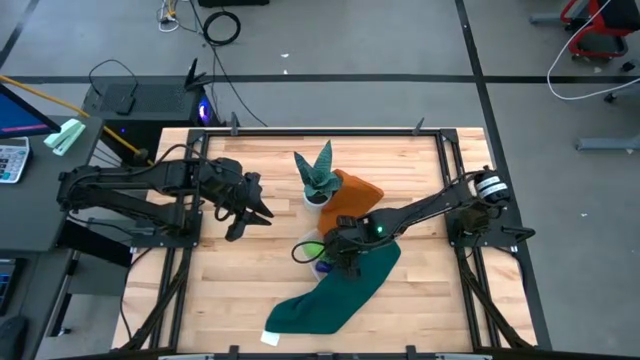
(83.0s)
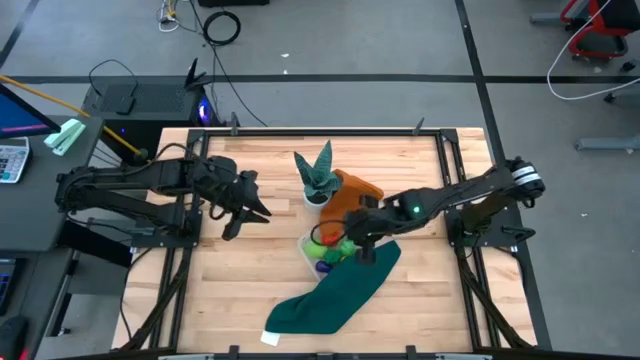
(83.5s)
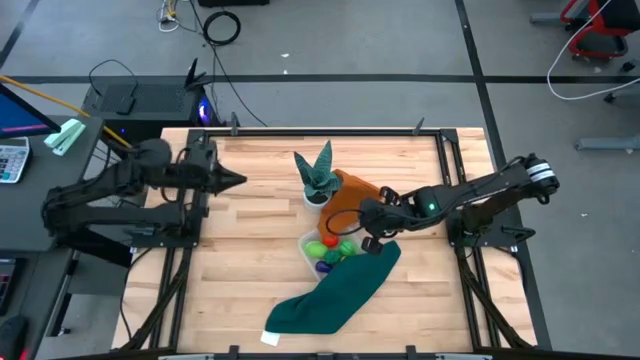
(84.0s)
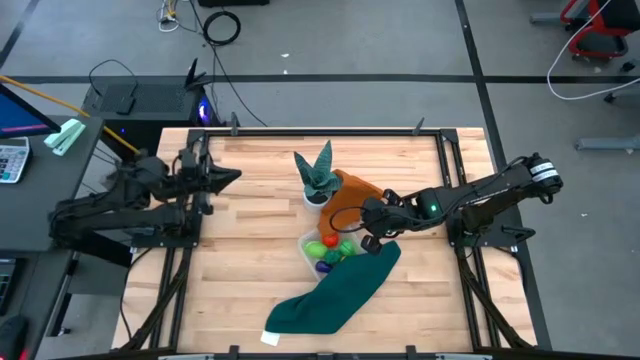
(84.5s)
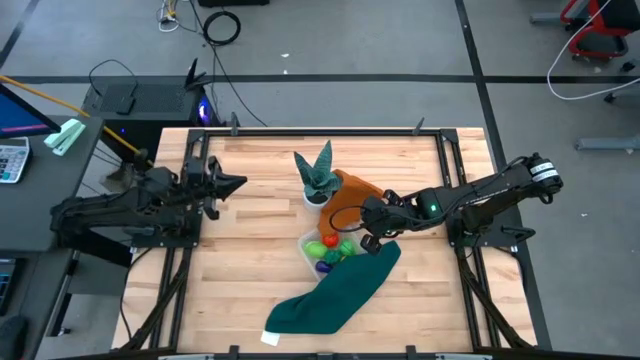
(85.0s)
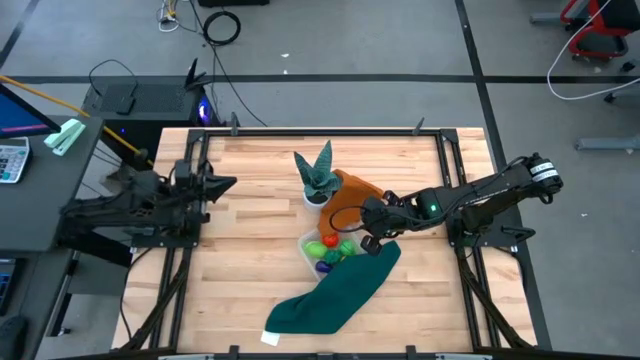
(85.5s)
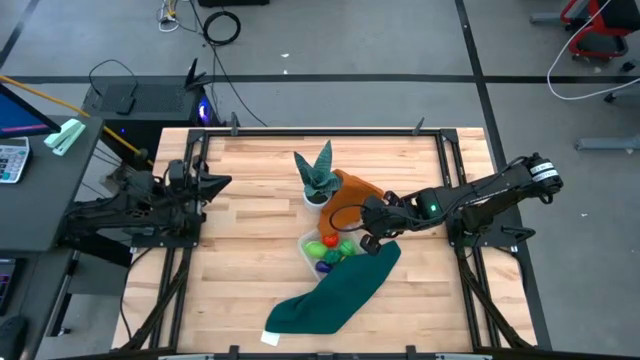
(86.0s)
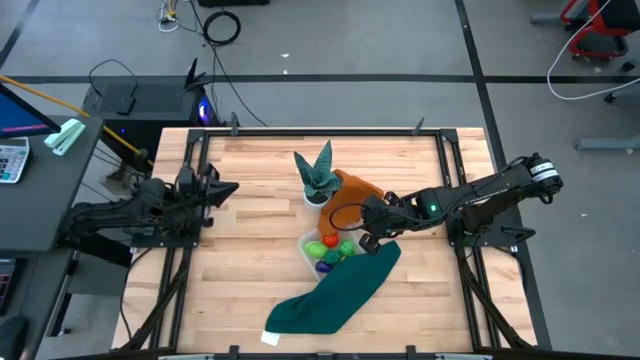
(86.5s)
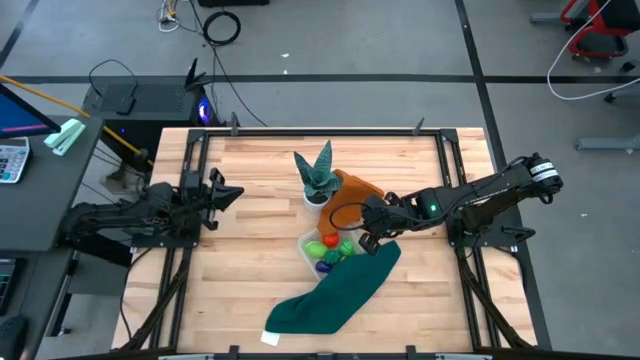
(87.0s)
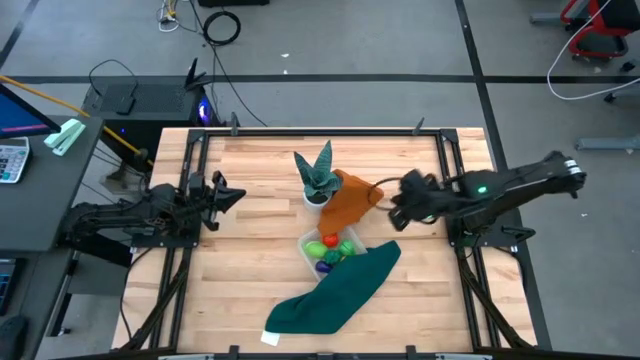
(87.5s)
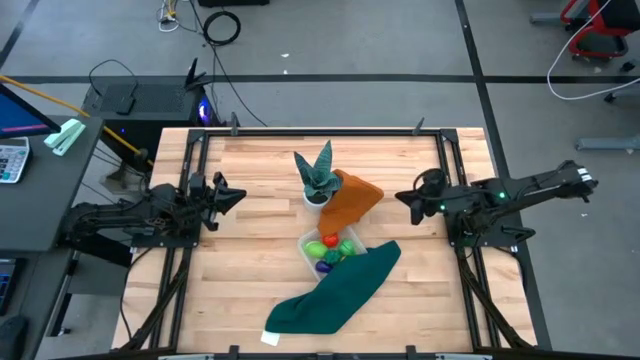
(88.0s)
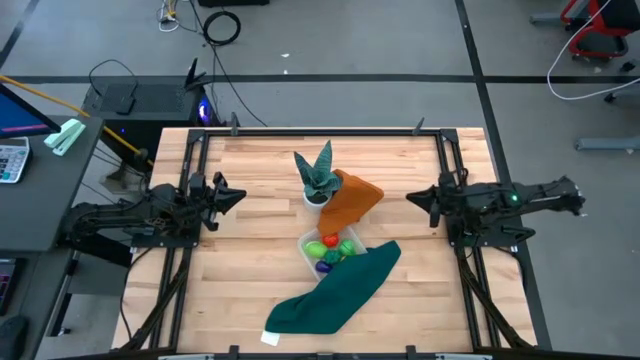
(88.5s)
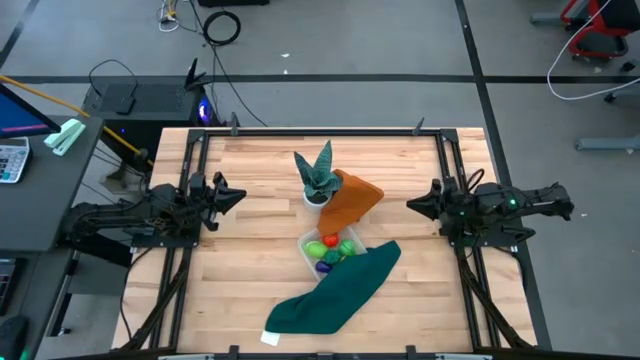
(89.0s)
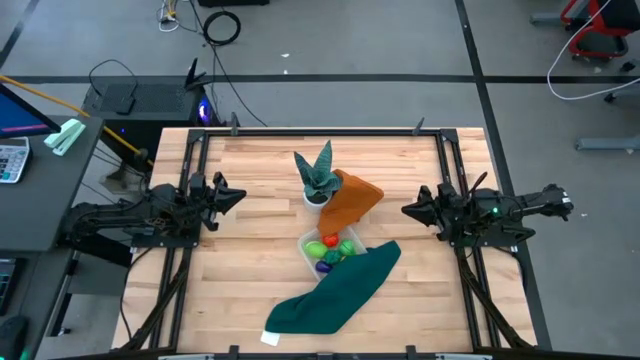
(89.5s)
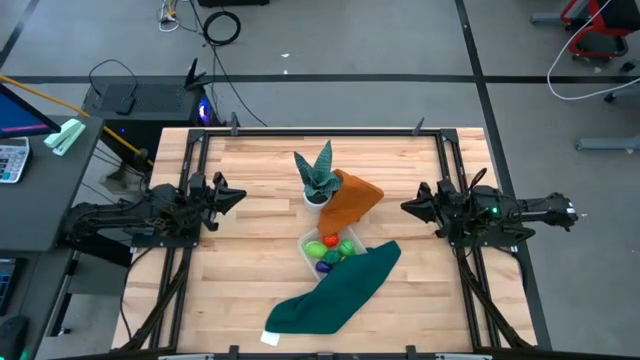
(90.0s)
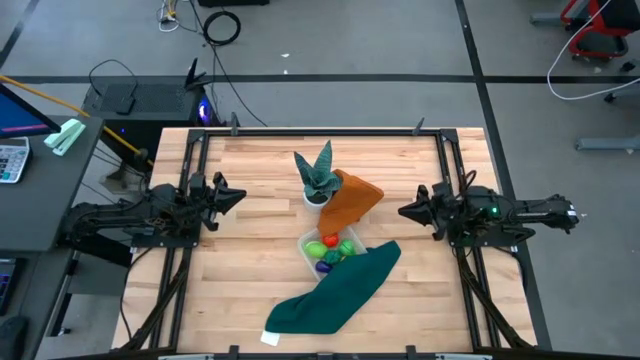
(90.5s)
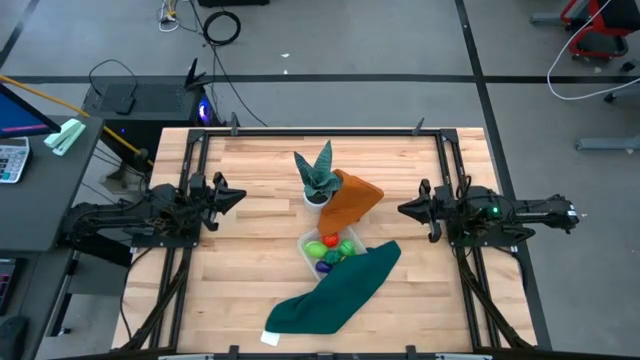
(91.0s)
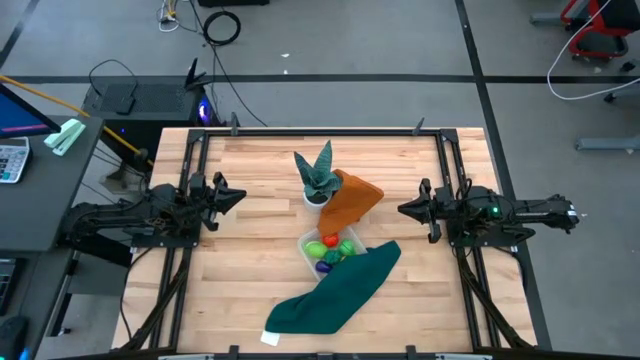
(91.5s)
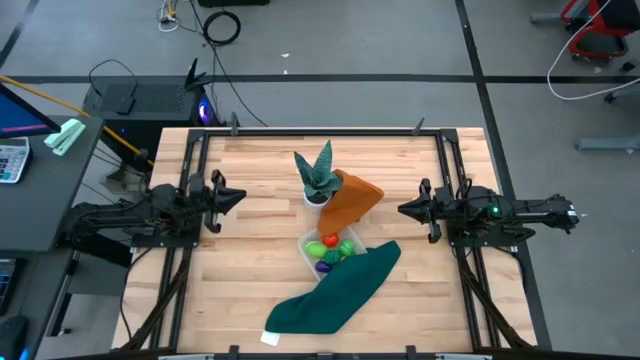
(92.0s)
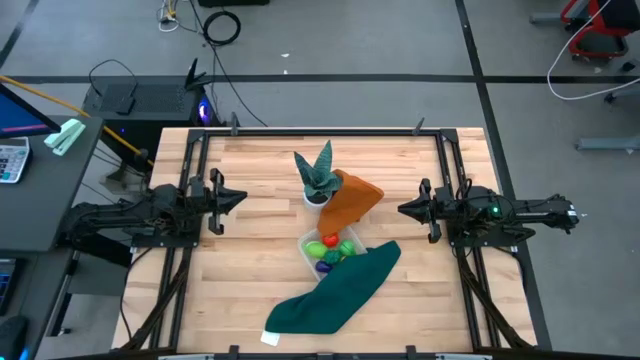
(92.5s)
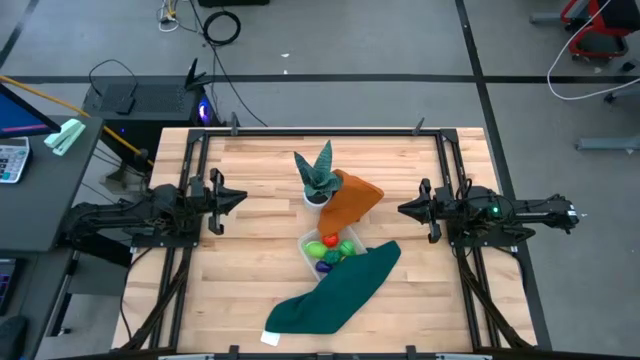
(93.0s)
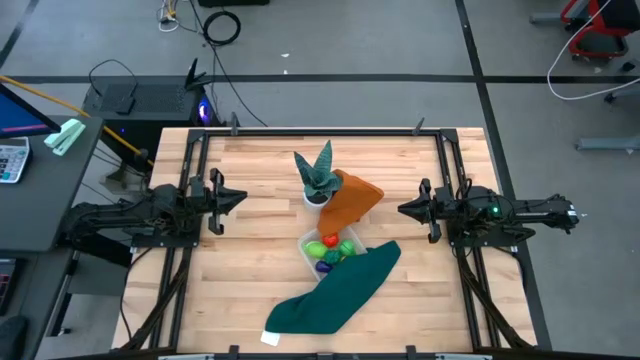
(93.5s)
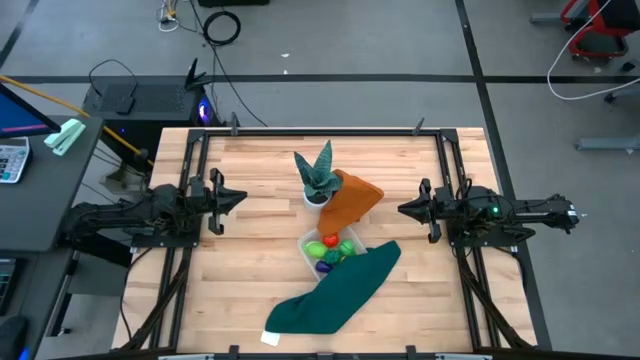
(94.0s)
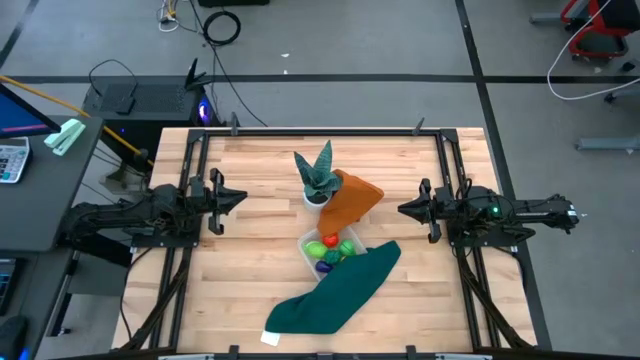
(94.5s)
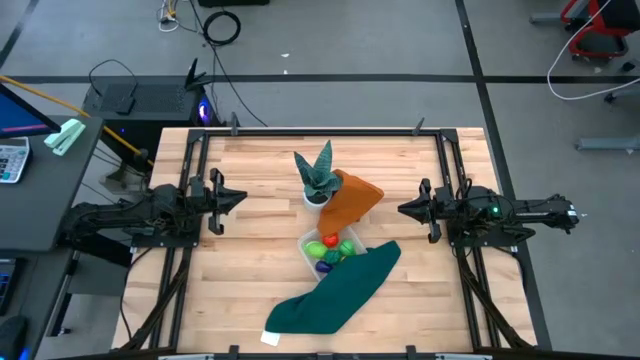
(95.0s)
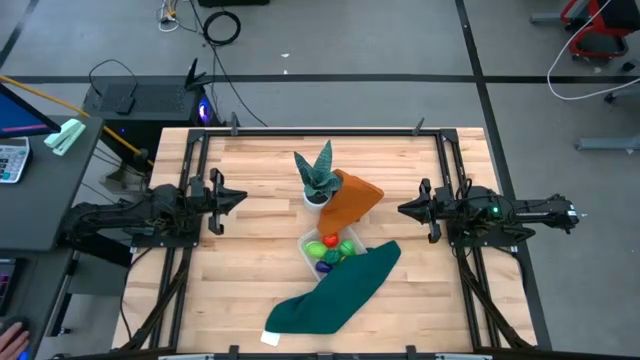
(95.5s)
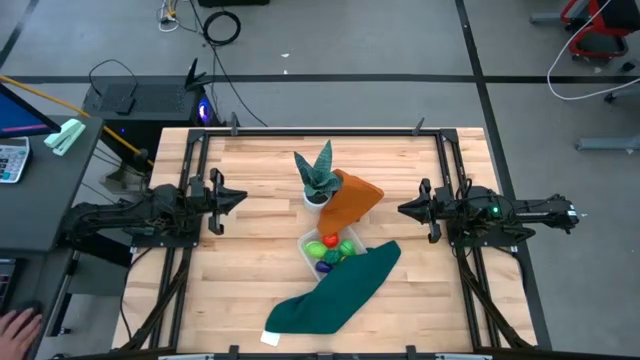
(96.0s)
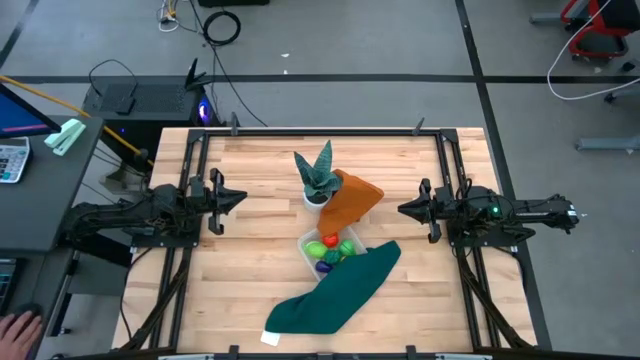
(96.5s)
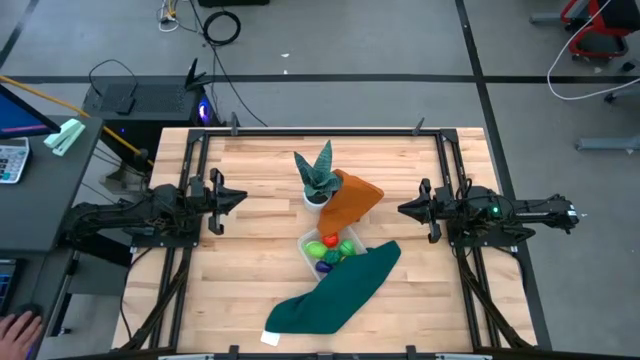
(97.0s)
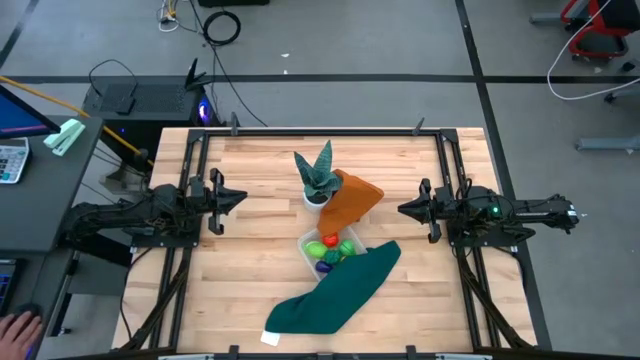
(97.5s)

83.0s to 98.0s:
Task: Pick and placing Produce into tupperware
Return to Home Position

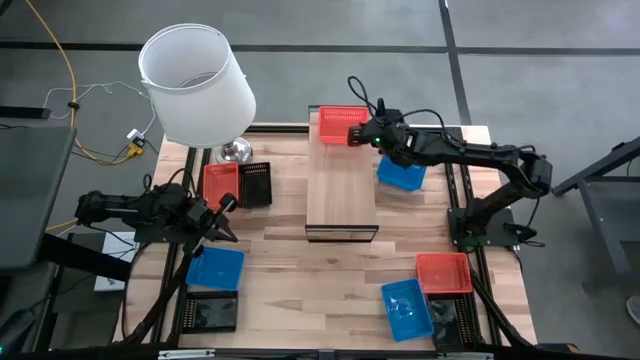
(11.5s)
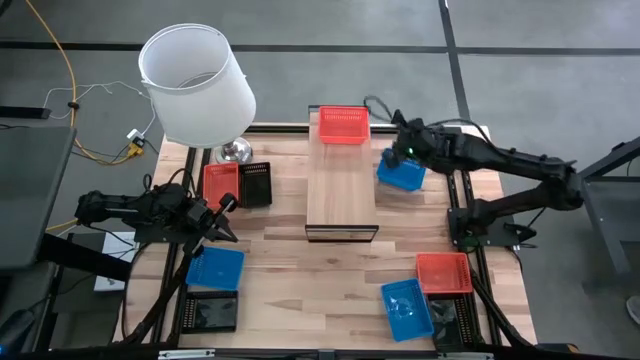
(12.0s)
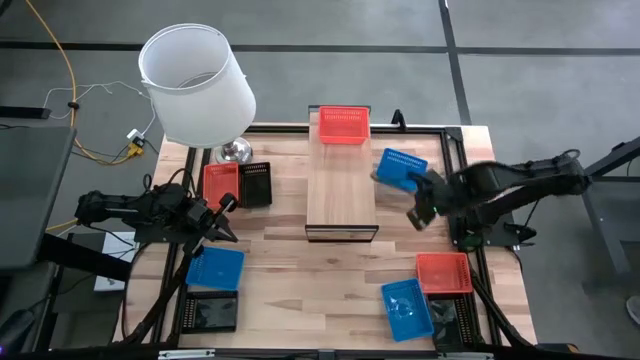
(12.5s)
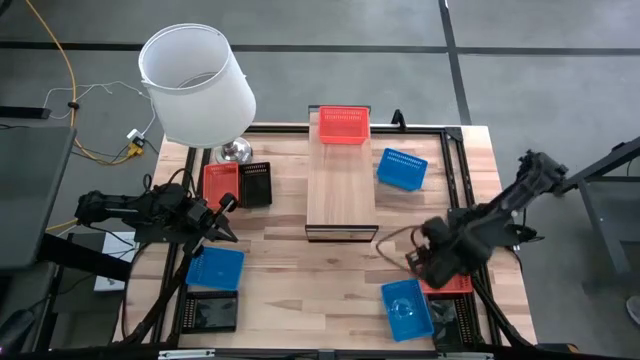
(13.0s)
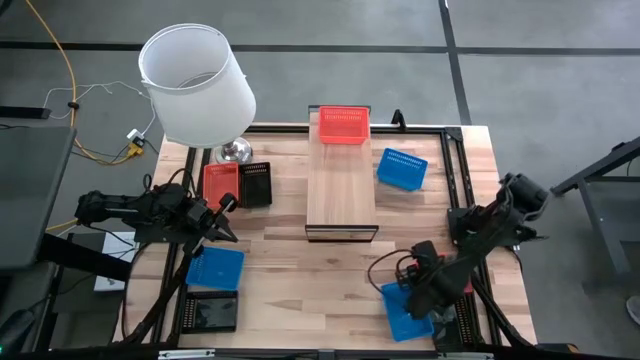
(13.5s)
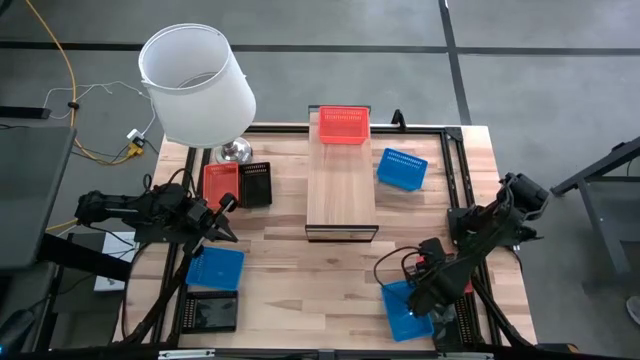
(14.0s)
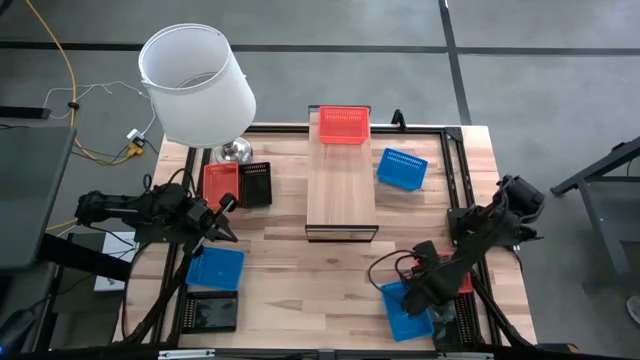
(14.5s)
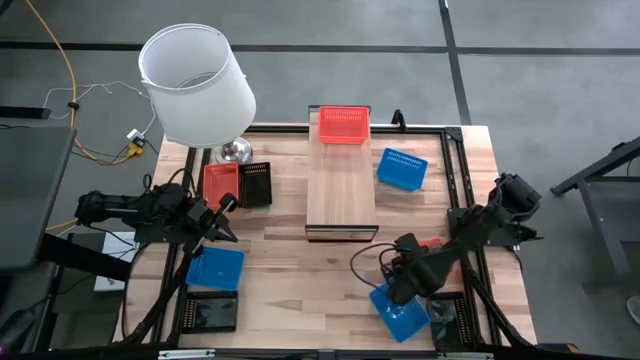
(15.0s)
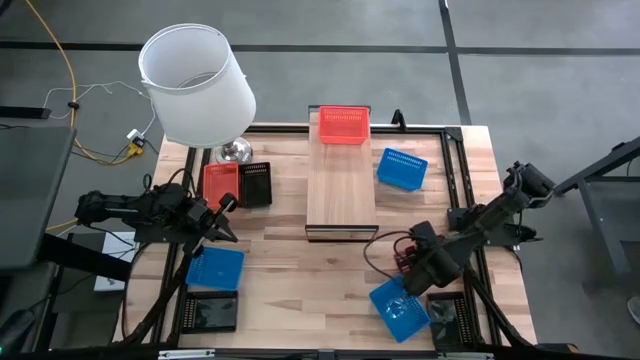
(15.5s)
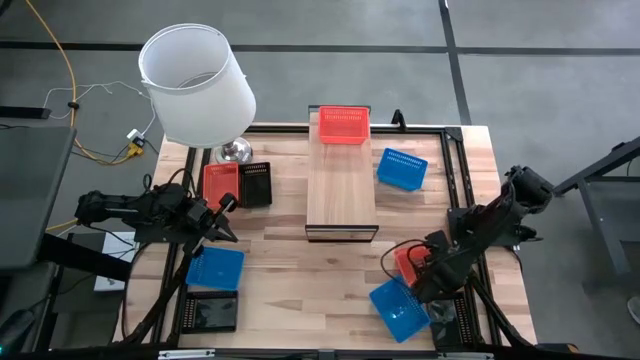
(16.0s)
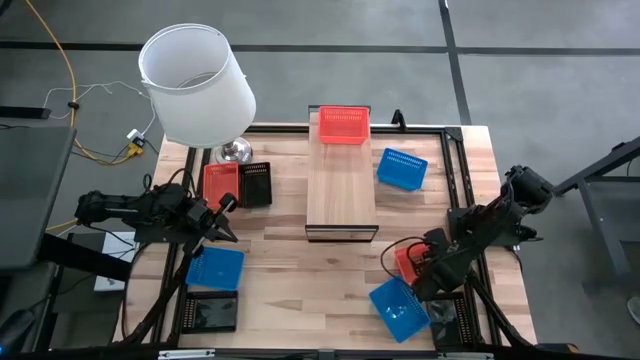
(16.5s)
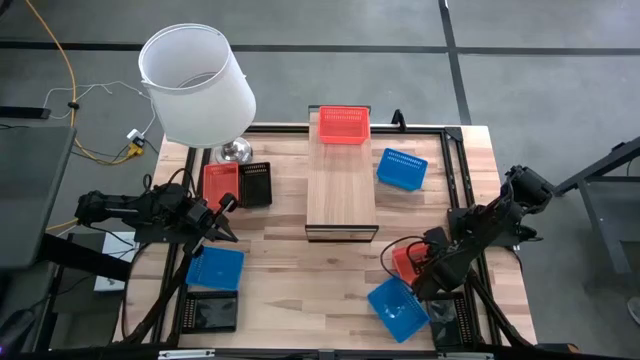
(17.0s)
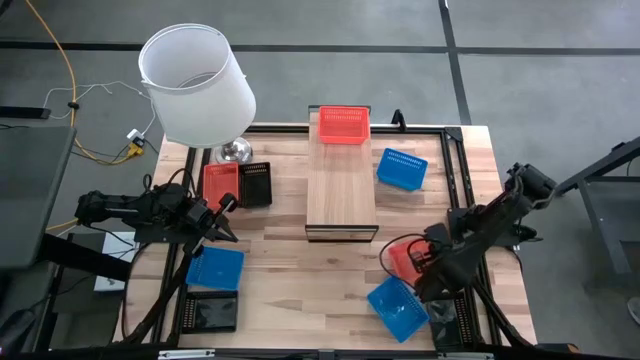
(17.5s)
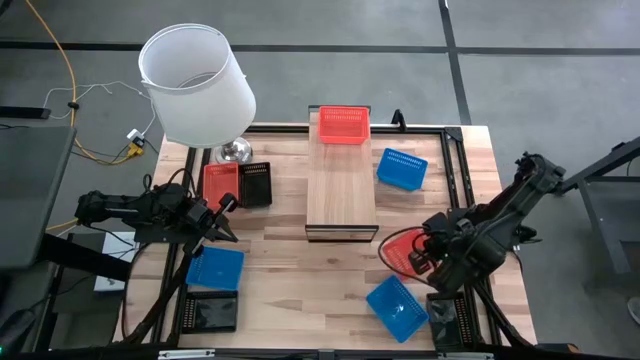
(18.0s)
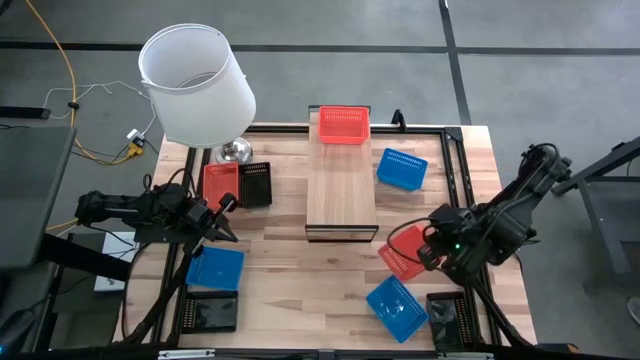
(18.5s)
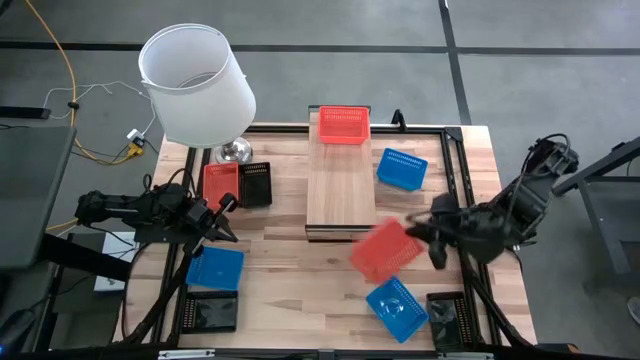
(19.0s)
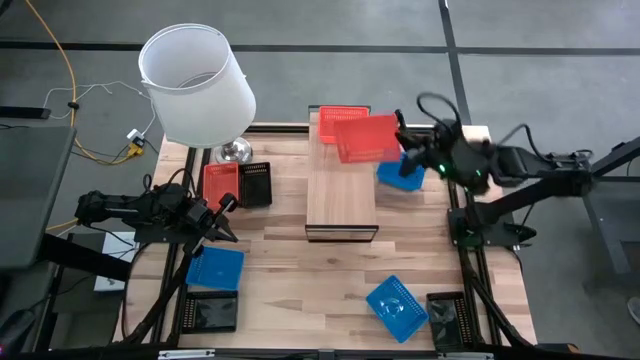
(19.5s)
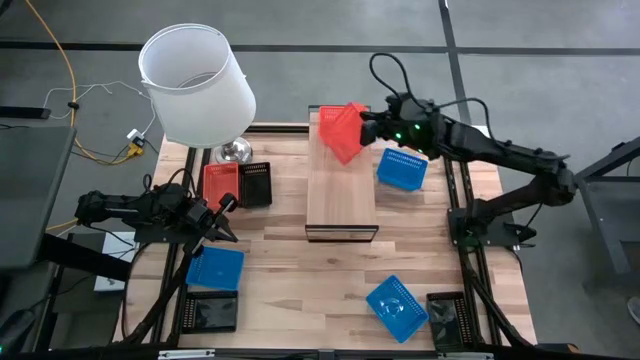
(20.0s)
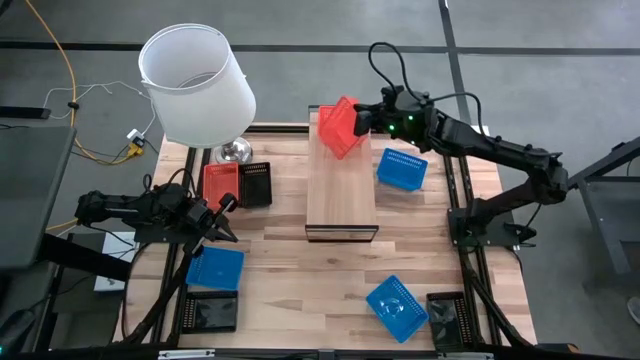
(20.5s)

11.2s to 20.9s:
Task: Stack baskets on shelf by color
Stack the right orange bin on top of the orange bin on the shelf
